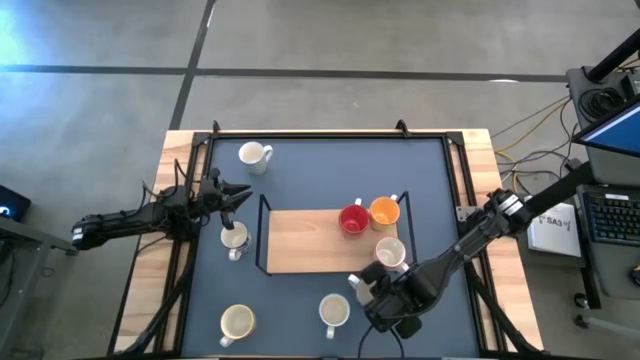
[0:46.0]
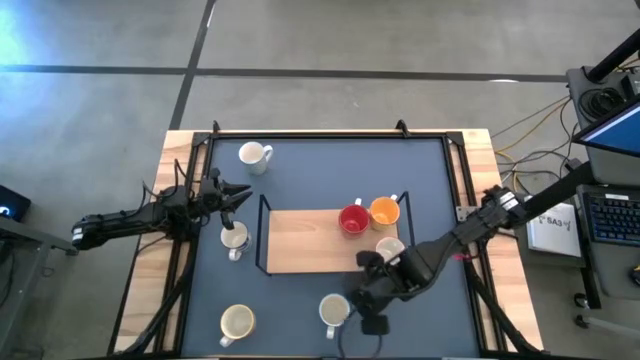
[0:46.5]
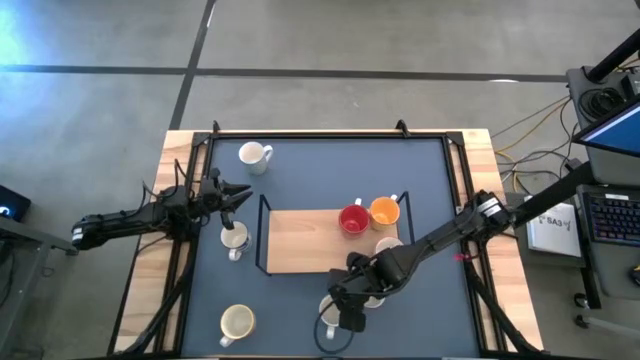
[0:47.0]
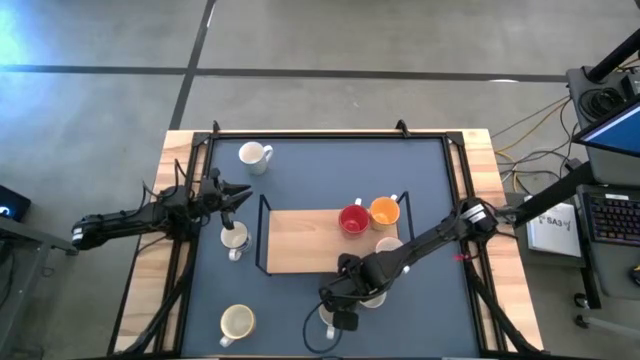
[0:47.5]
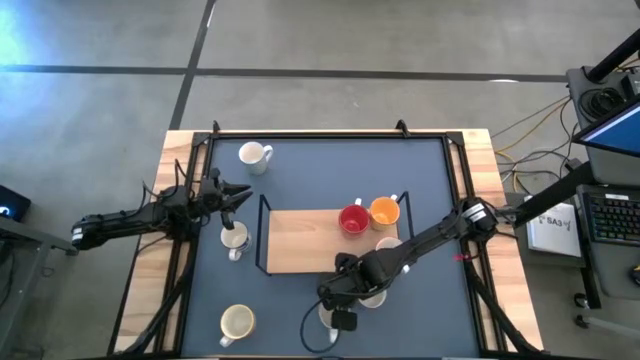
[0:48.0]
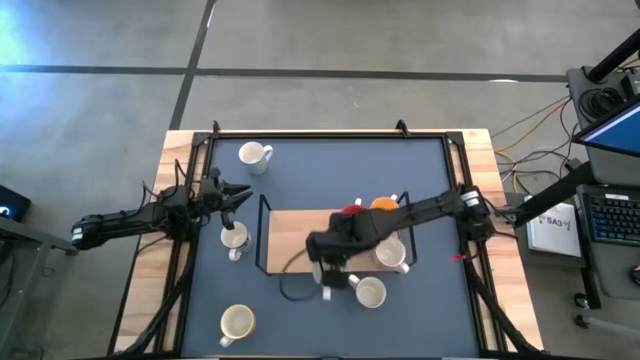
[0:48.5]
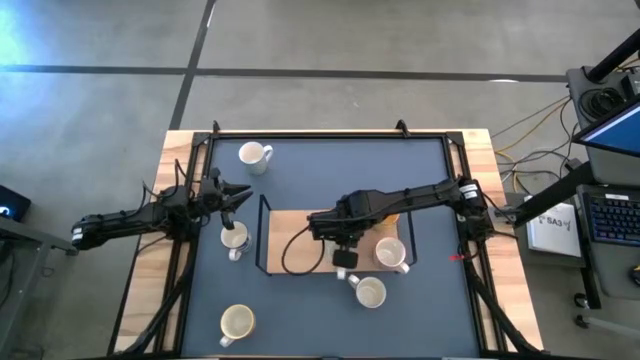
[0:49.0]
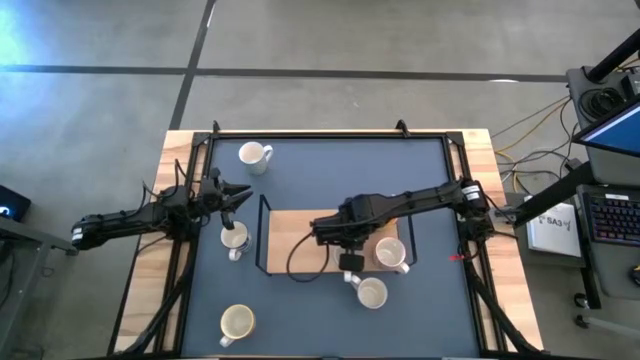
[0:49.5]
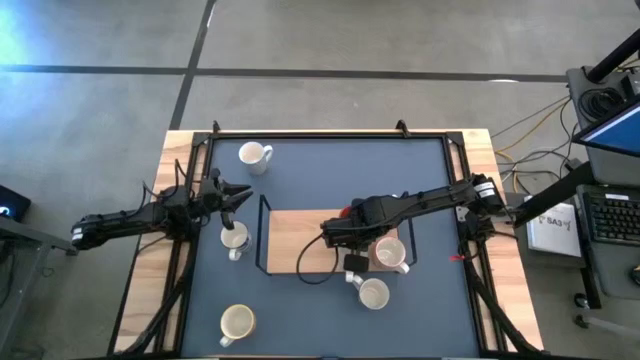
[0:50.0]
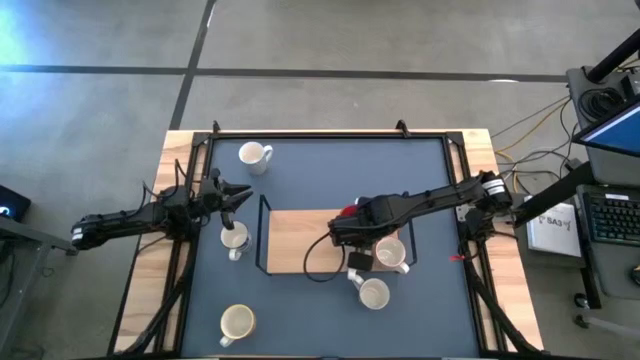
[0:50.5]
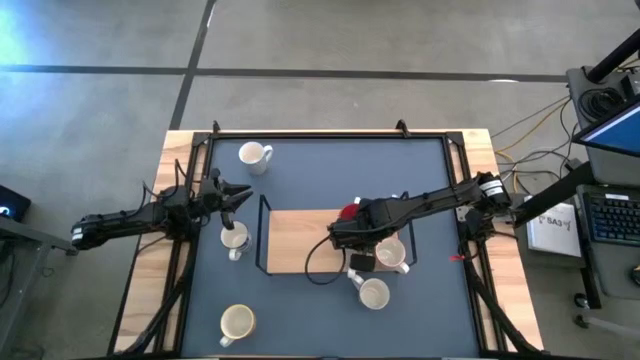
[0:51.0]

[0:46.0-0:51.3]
Task: Place coffee mugs
Put the red cup on the shelf aligned with the other red cup

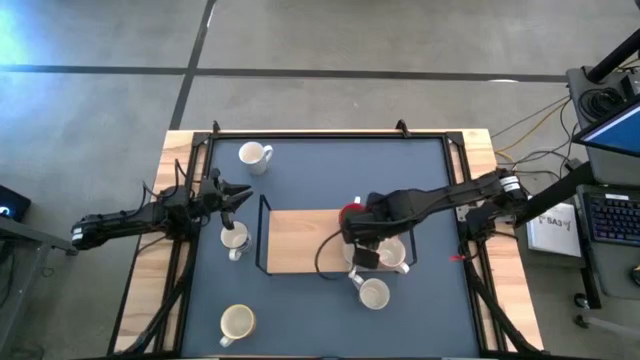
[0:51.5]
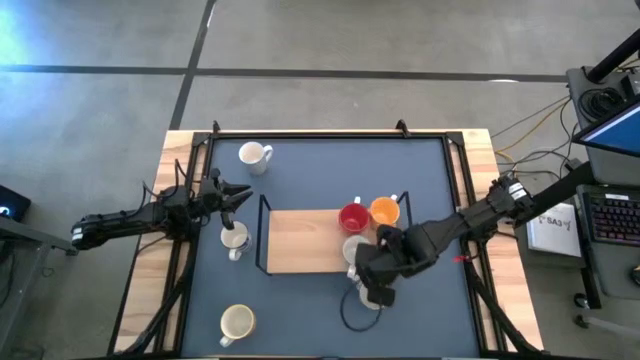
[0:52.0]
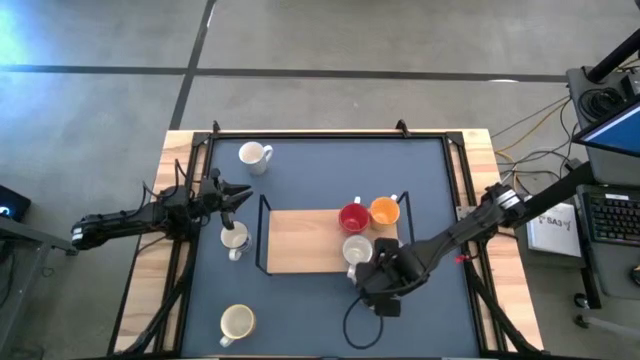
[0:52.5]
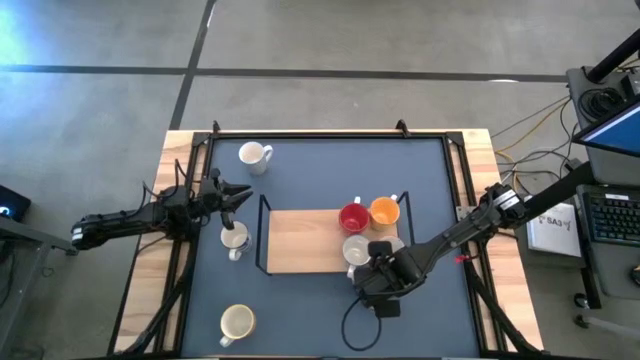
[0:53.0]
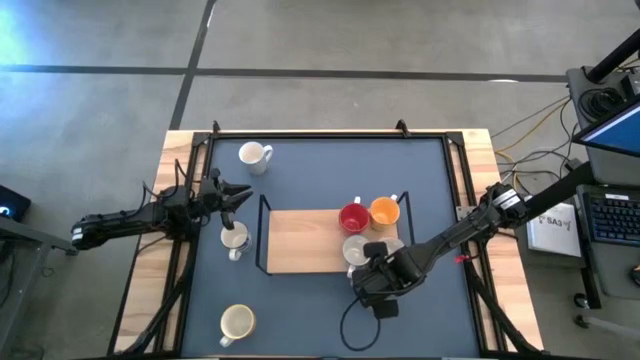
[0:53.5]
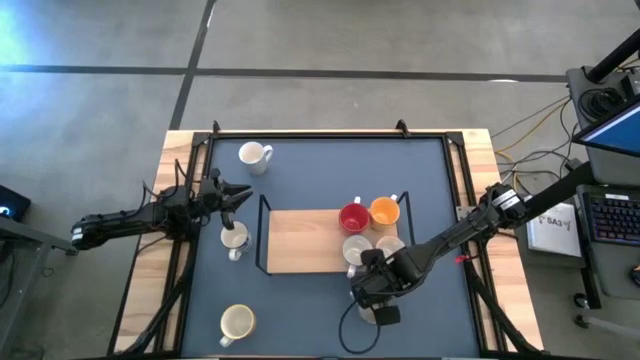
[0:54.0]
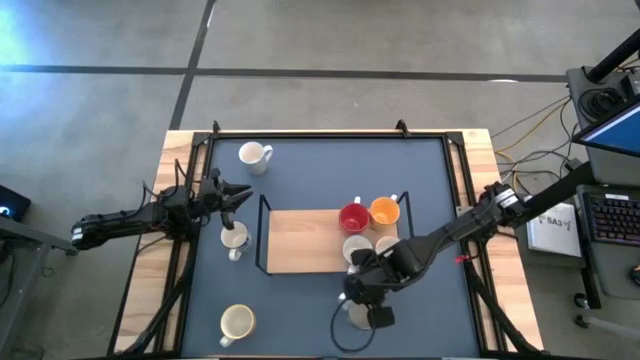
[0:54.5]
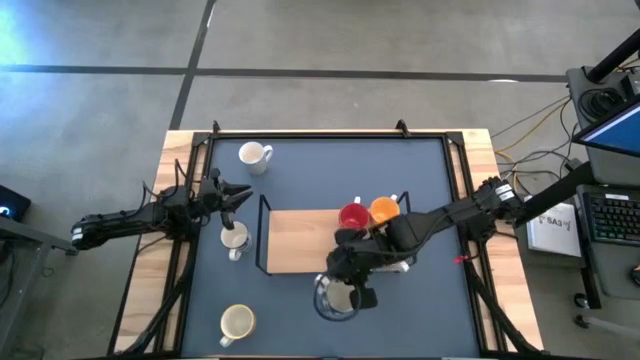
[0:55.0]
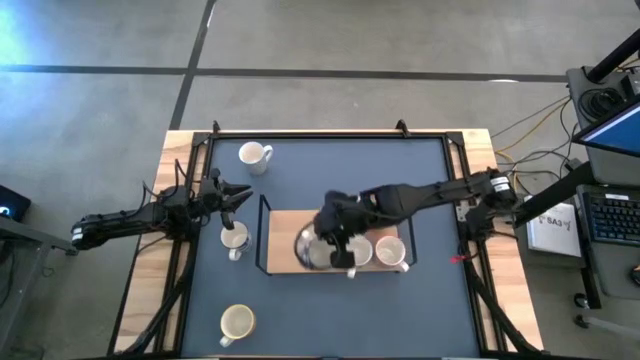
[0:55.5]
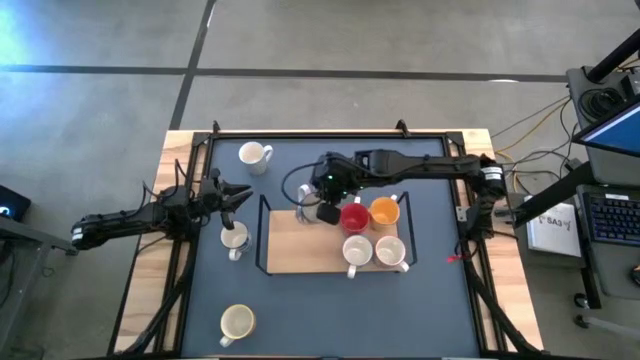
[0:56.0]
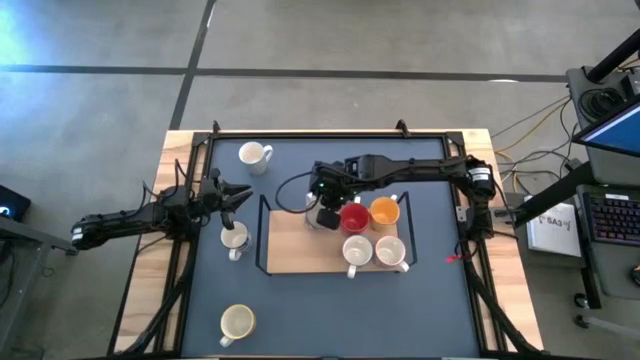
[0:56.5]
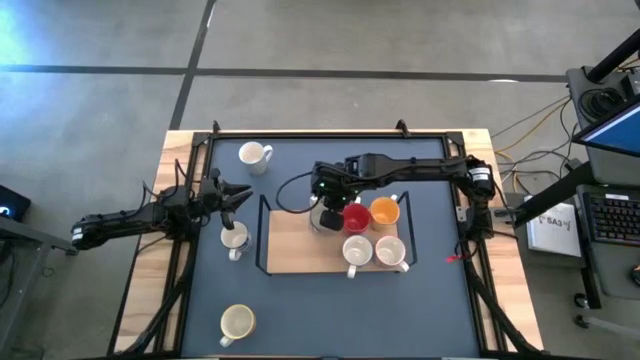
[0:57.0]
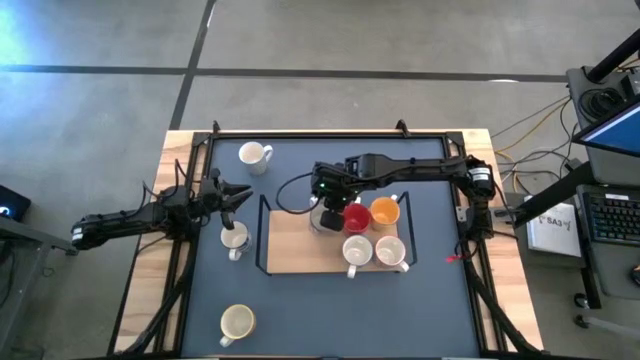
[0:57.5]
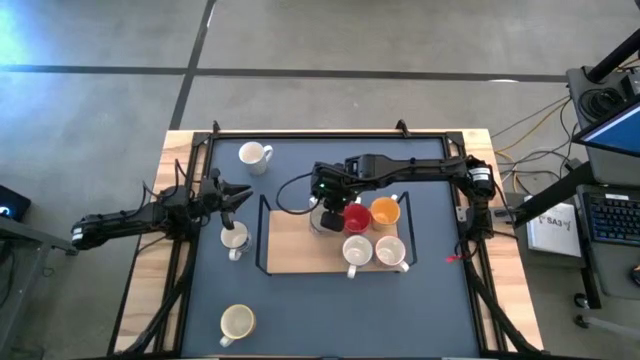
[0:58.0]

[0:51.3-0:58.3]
Put the bottom blue cup on the shelf

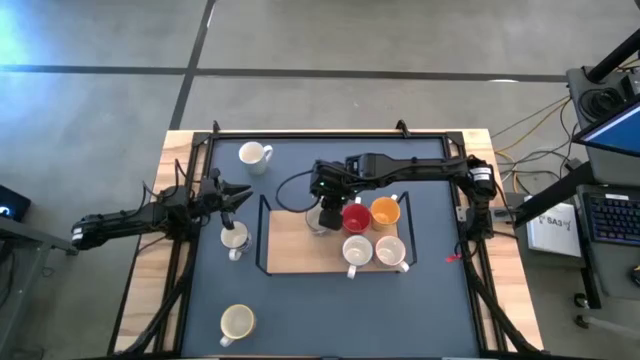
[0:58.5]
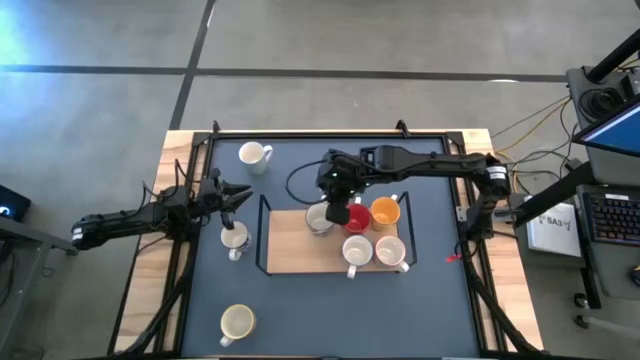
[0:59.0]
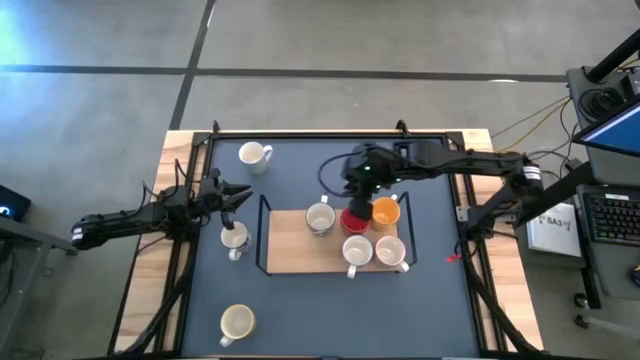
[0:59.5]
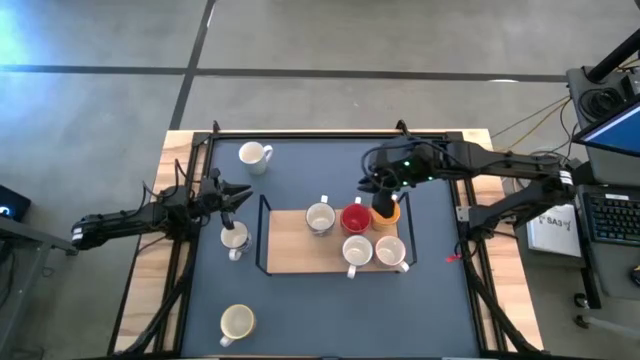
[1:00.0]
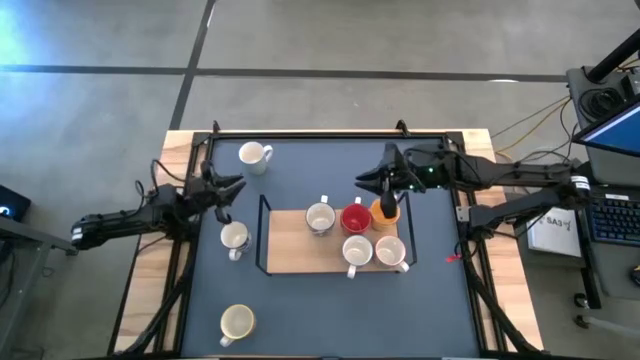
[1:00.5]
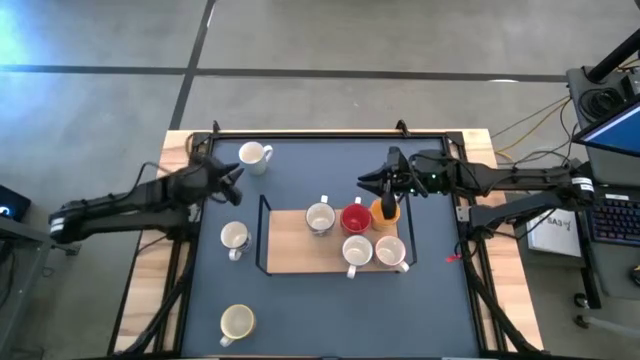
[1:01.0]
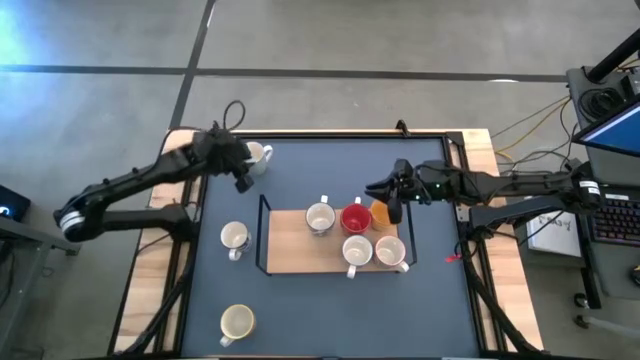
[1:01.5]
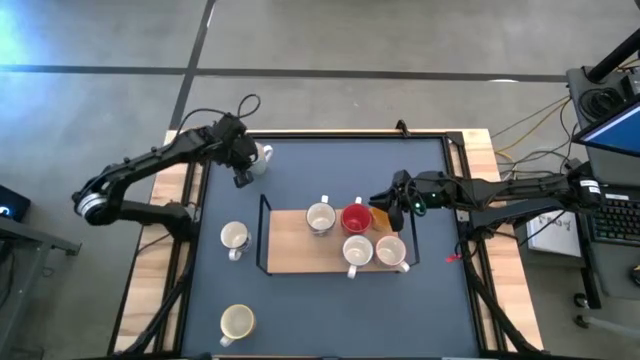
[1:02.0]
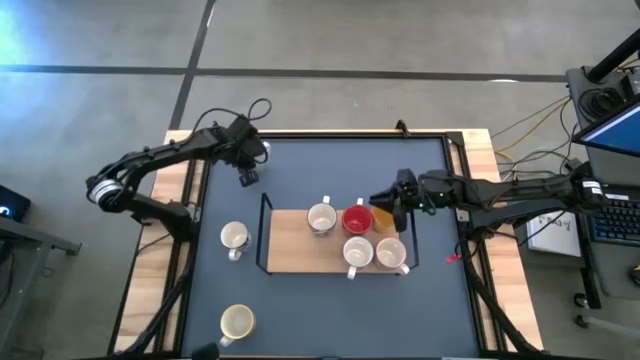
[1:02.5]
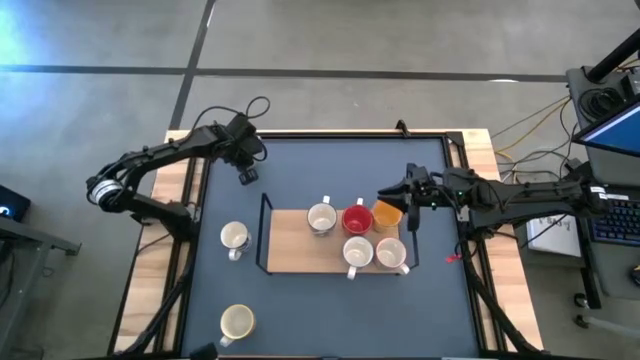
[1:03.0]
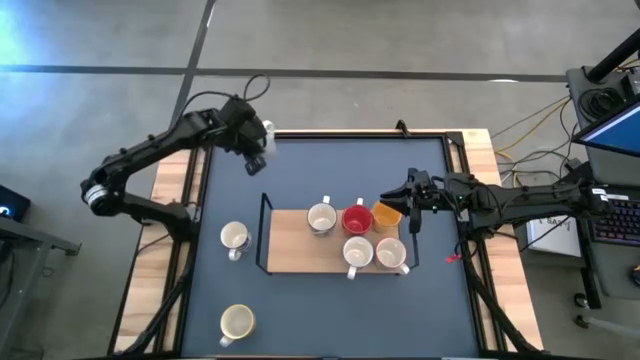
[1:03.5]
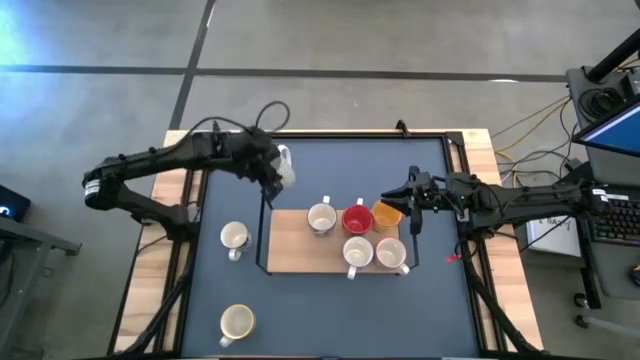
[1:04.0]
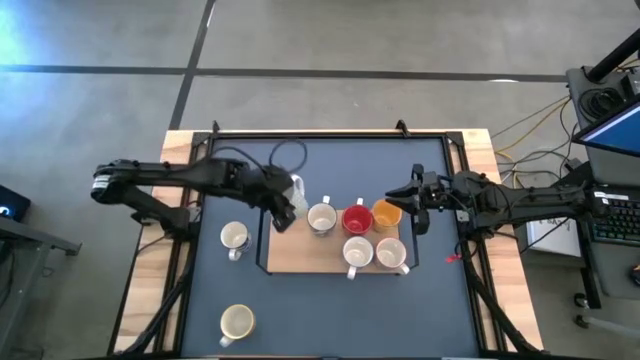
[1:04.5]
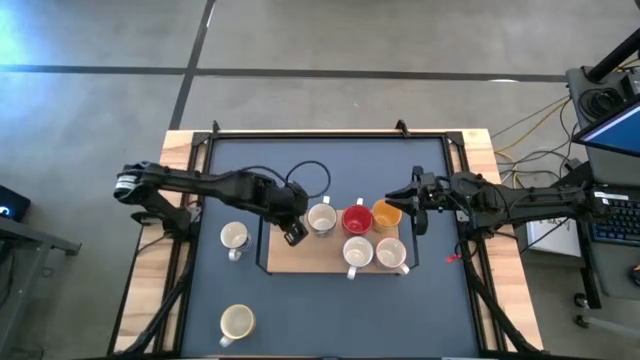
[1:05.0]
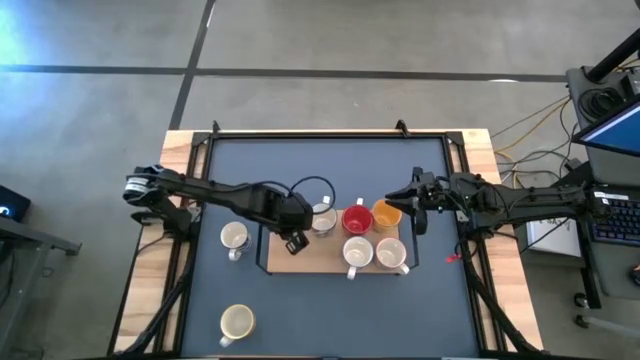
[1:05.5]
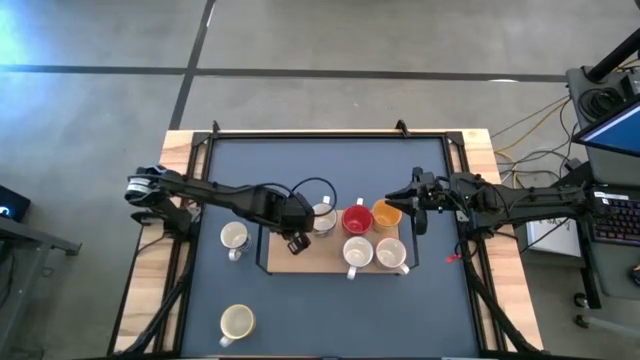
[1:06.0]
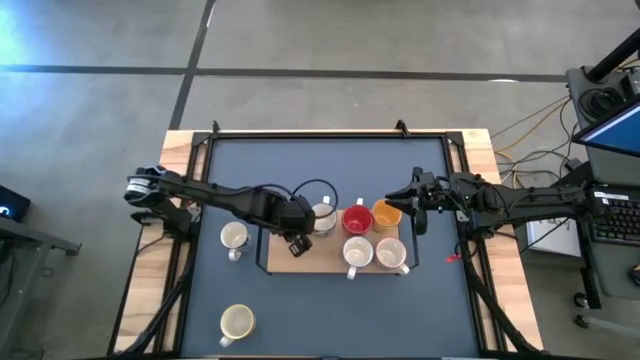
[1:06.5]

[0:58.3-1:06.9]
Put the green cup on the shelf
